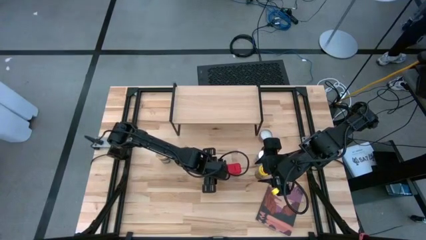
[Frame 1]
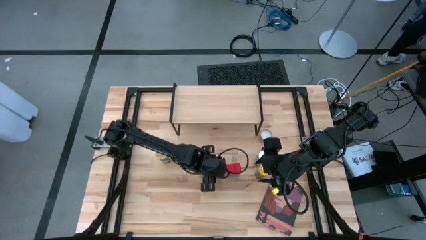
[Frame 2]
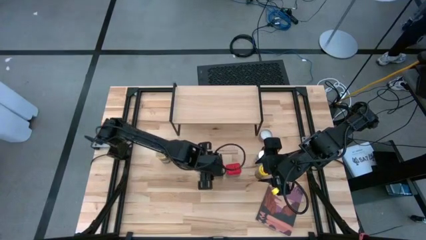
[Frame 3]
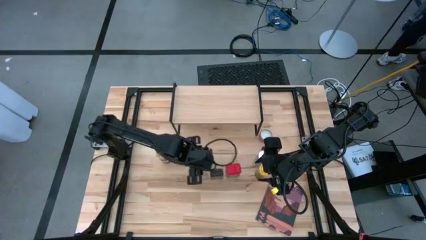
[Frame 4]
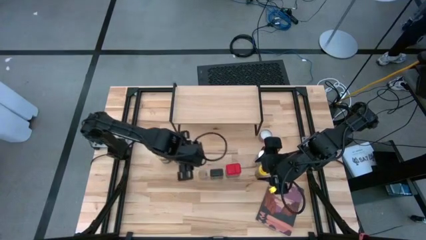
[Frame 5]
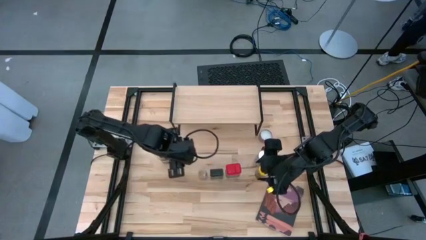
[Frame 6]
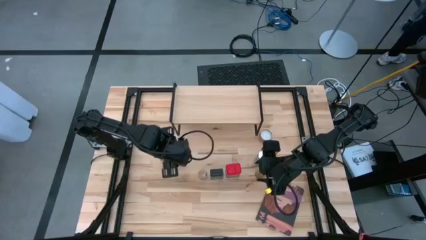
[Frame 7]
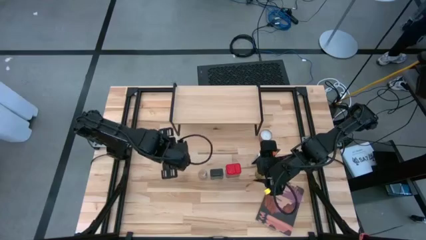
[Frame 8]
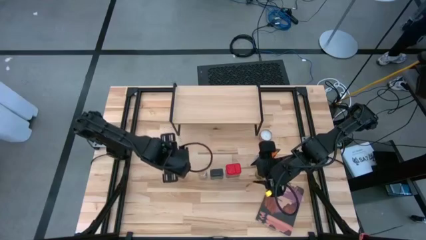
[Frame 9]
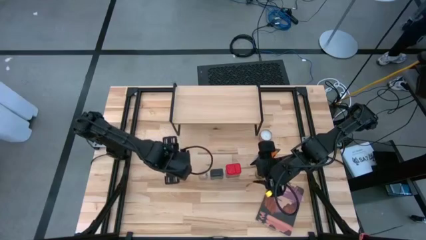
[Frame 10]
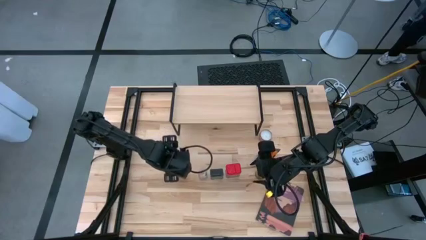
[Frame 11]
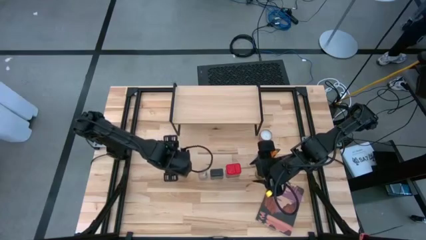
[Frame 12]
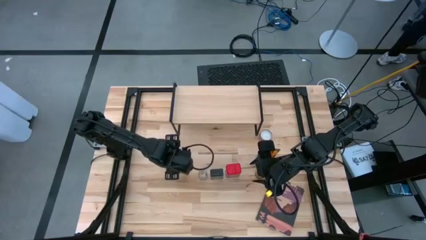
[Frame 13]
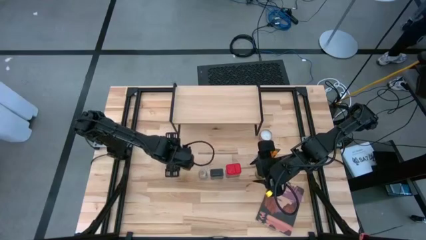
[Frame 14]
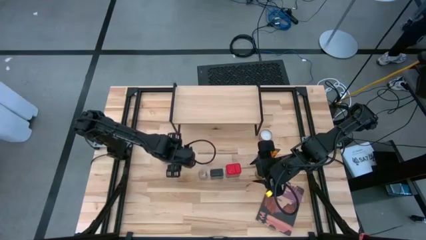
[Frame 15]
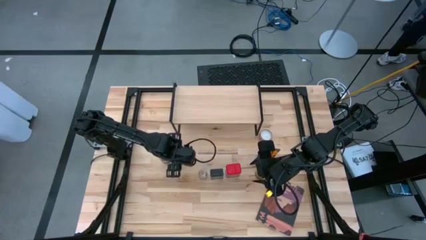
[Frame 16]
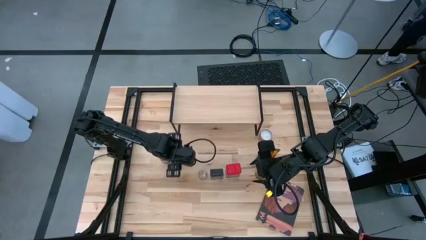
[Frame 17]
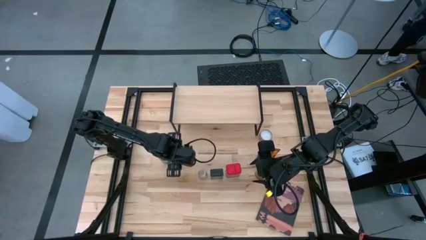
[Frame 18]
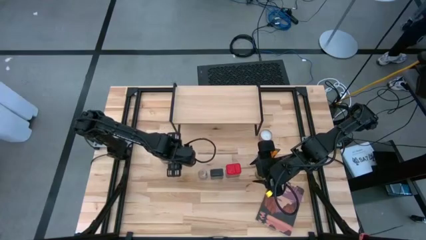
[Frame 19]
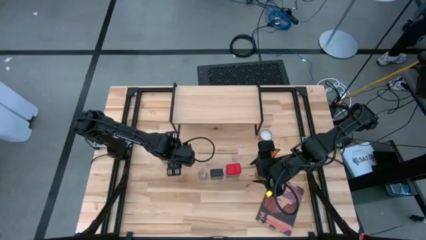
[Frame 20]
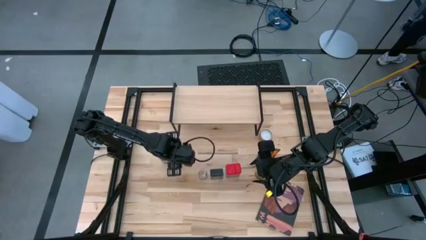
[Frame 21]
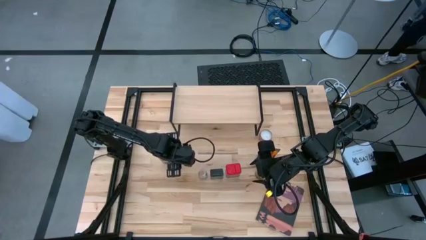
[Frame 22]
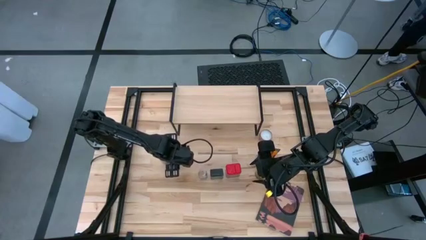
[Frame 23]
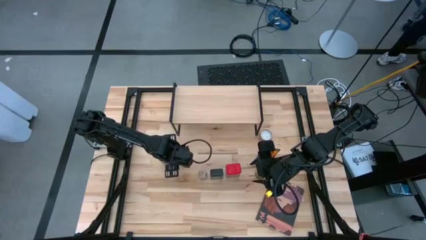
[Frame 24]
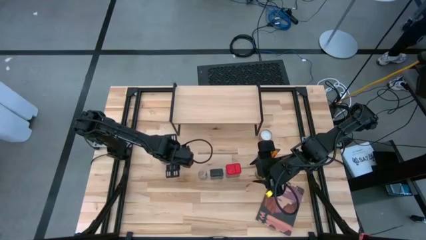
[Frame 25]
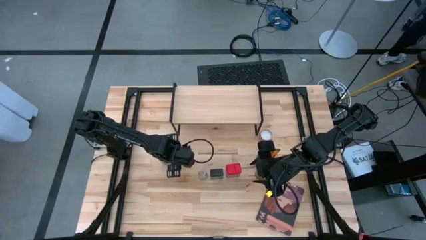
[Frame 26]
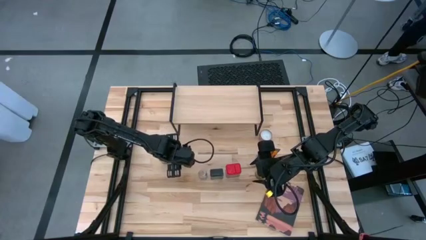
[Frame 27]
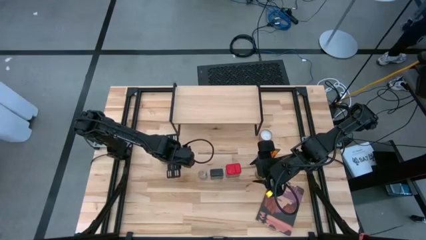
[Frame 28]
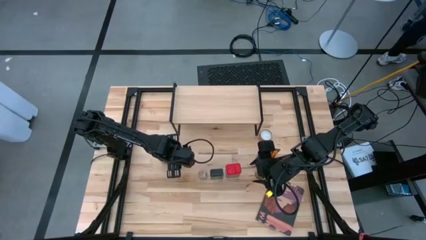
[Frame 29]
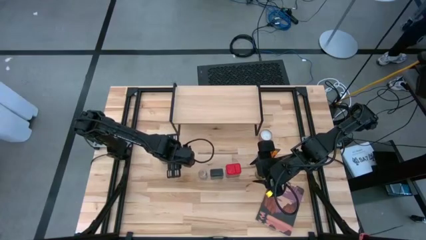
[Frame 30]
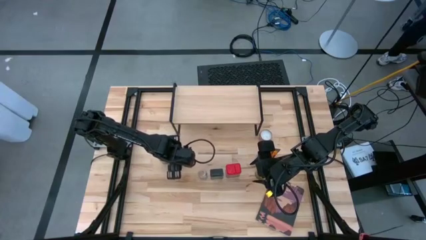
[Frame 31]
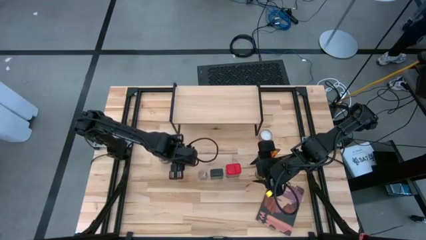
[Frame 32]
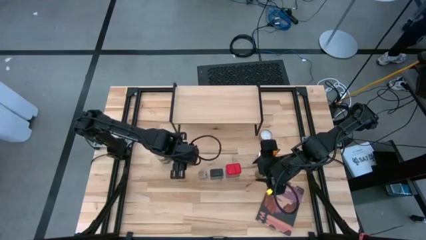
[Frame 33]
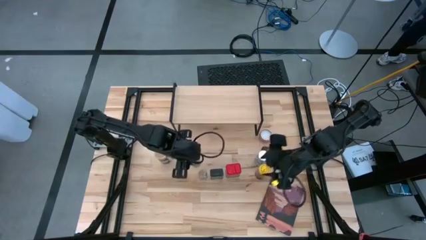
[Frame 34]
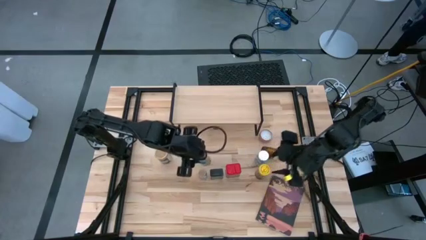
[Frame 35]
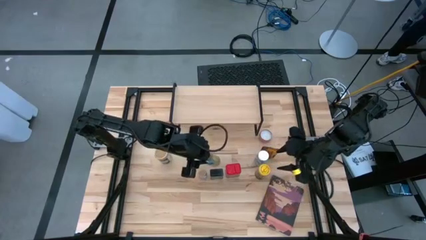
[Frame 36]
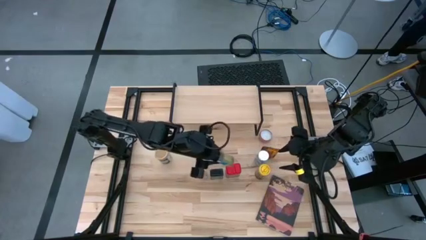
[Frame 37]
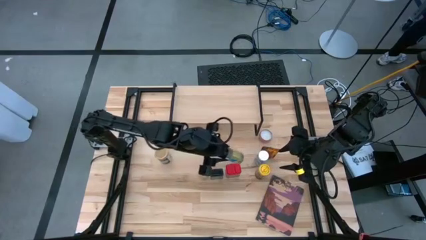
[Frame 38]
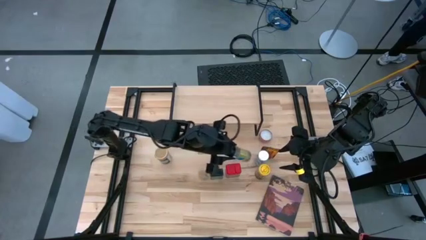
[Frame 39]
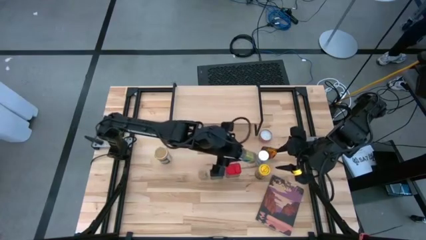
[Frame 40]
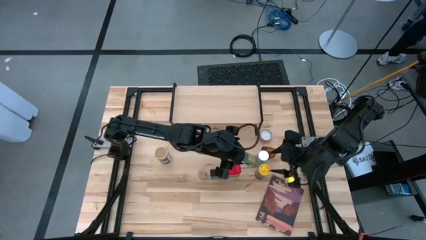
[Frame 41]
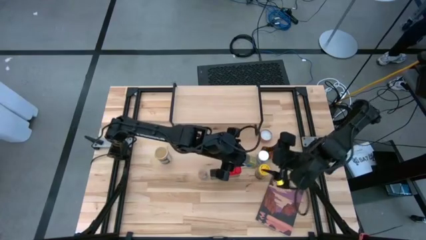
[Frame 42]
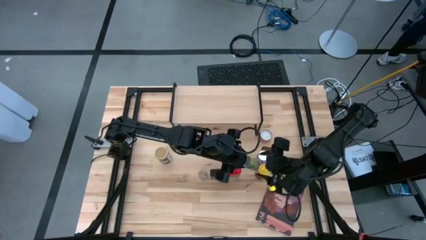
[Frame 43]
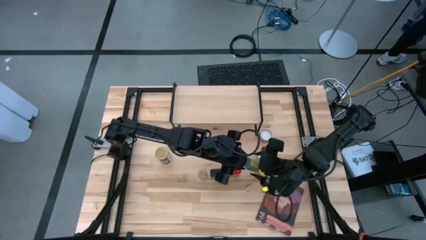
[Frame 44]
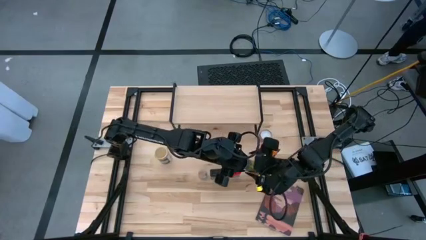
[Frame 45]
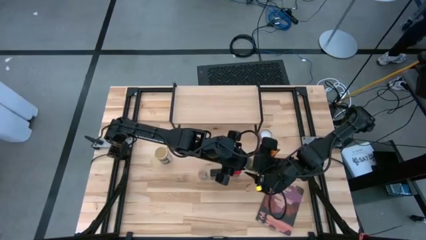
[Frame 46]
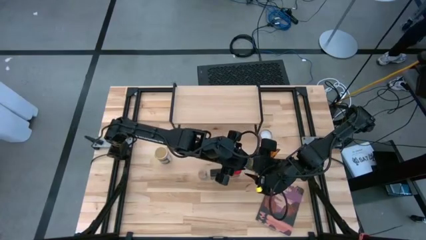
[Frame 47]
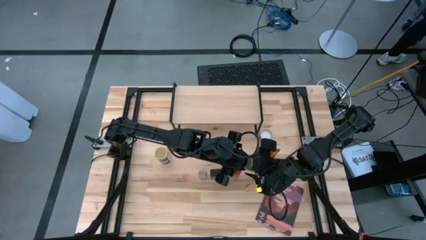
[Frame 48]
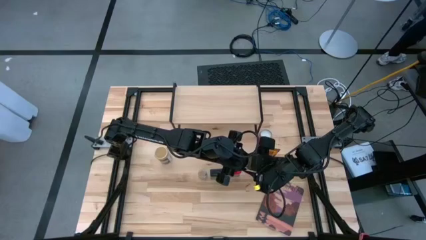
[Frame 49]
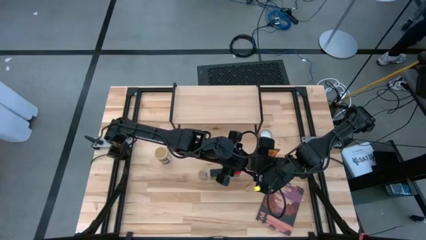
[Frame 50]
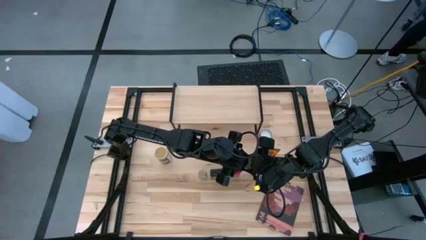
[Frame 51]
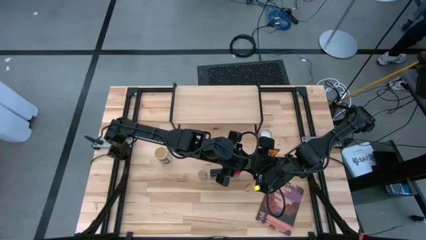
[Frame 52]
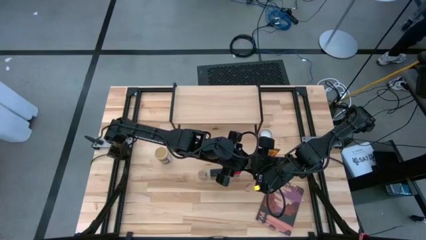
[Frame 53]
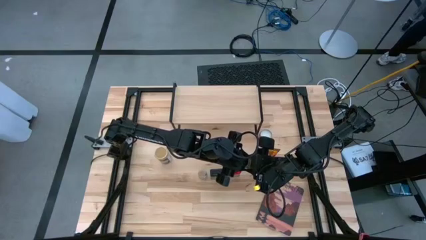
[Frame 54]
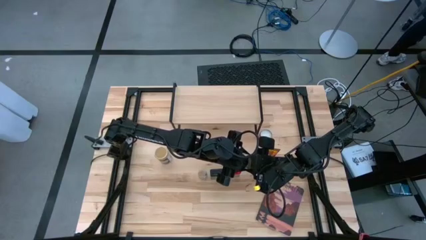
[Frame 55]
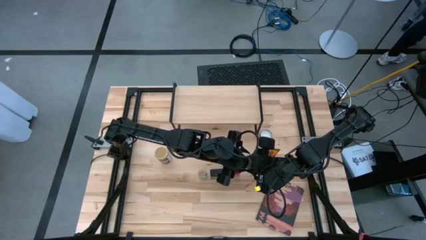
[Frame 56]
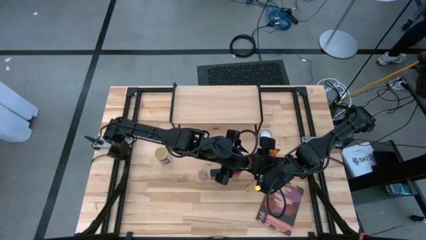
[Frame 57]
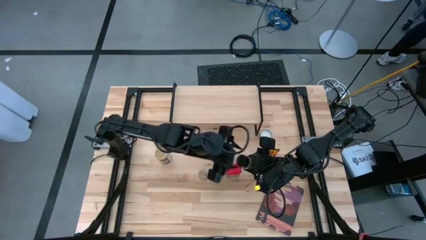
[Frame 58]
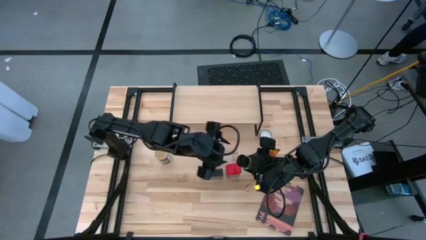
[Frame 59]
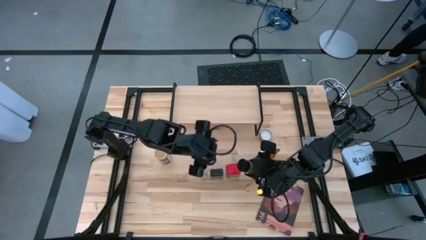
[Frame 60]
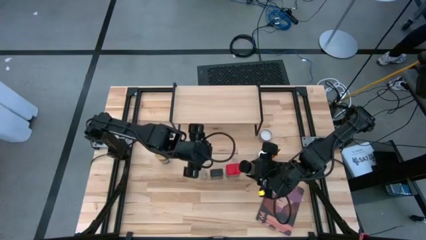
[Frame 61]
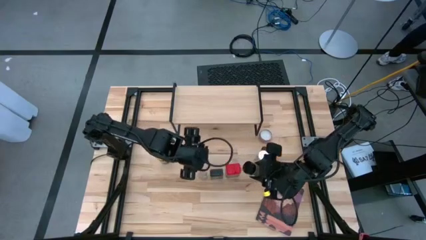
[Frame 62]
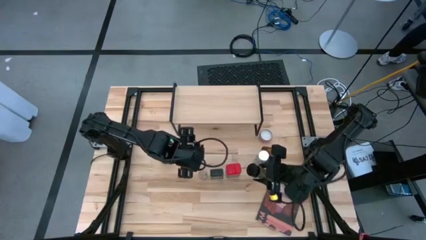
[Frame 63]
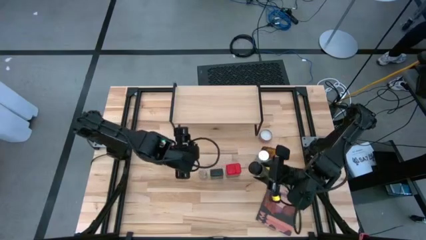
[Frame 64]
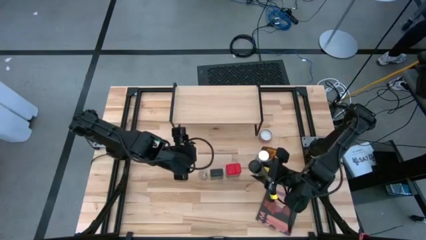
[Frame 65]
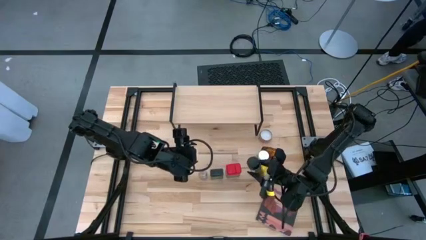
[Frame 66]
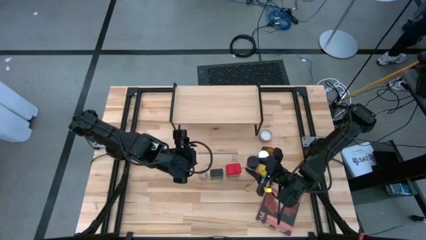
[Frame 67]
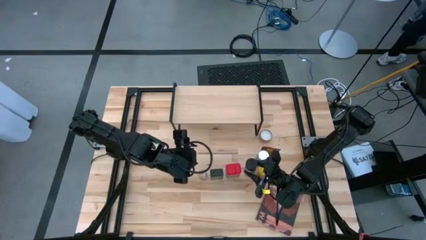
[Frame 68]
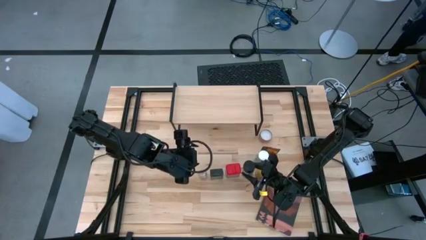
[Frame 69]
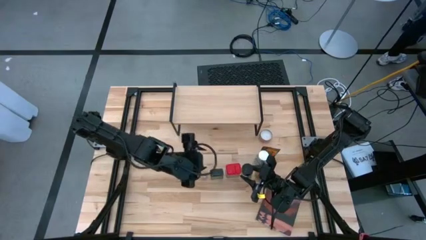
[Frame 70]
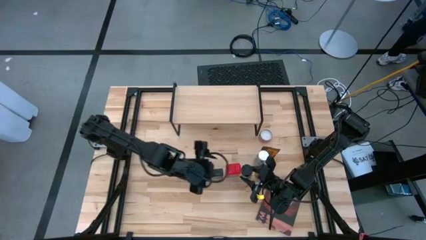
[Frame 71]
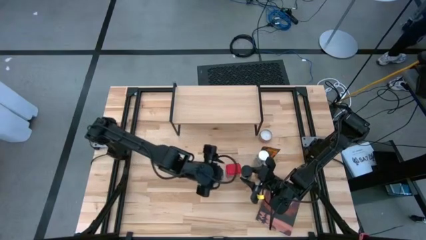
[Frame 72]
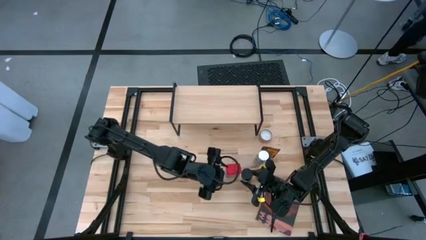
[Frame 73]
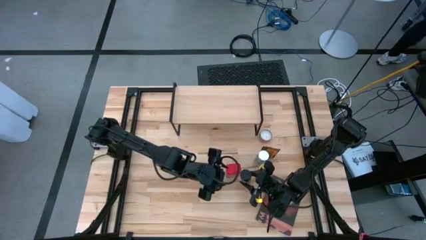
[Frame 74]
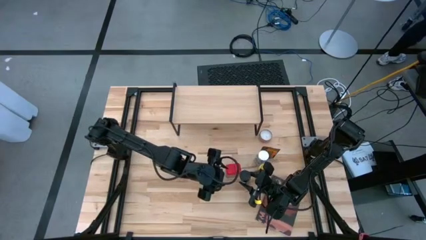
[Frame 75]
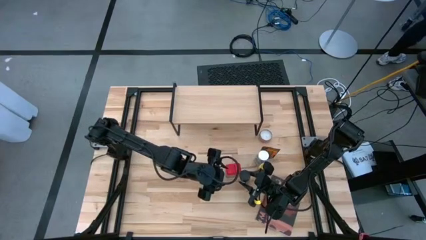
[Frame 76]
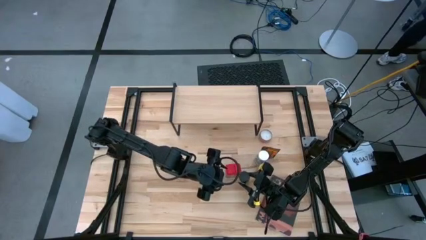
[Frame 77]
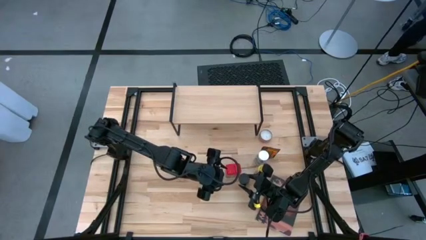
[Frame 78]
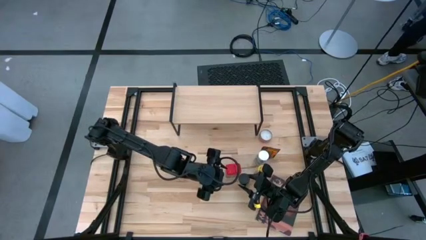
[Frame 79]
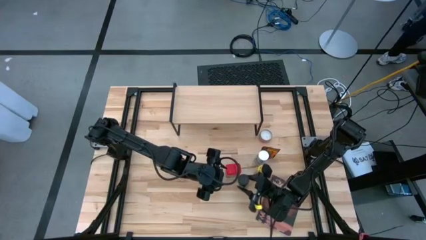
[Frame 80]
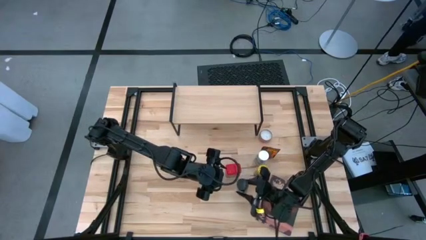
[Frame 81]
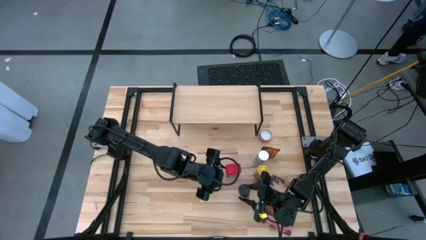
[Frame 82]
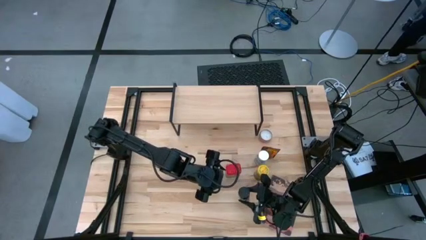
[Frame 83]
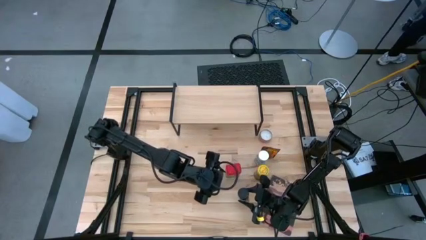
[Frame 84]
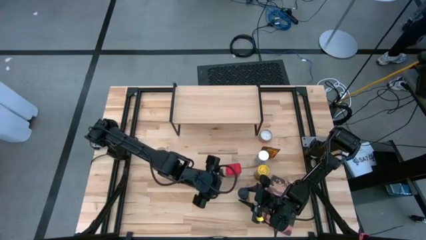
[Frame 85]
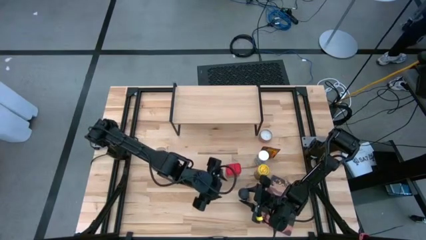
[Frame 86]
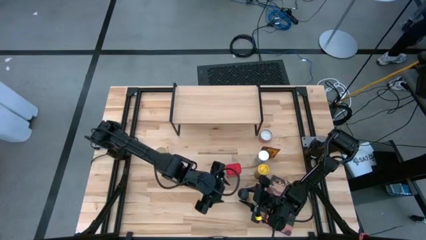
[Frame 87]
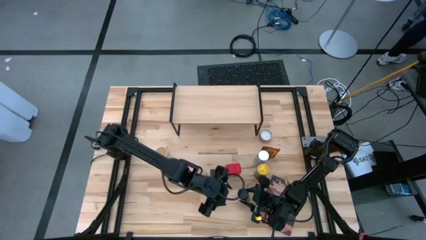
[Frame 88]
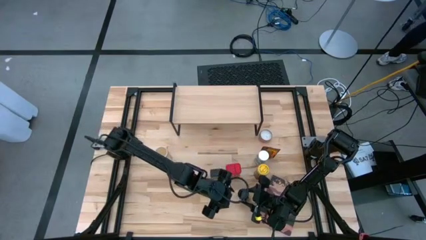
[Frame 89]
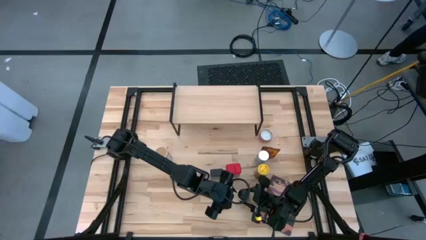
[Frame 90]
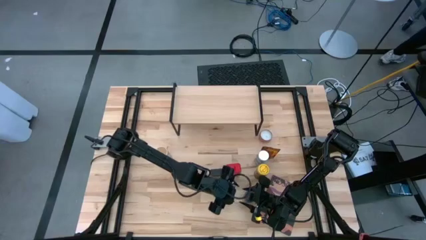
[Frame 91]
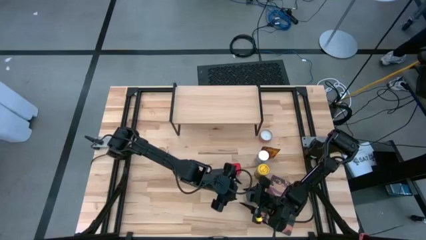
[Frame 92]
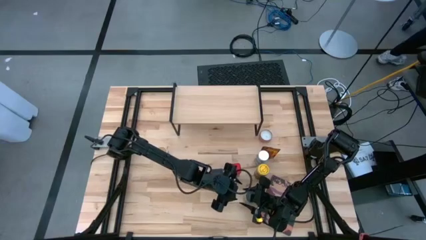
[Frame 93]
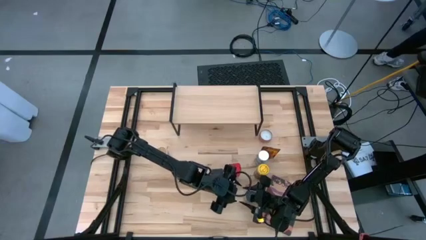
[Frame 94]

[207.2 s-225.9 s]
Task: Shelf spices
Put the dark yellow spice bottle into the center of the table
